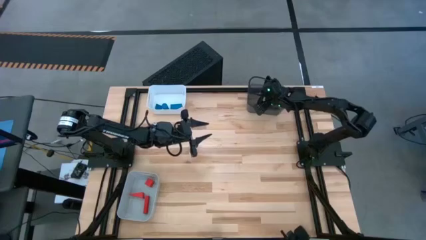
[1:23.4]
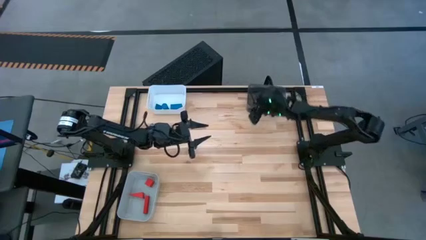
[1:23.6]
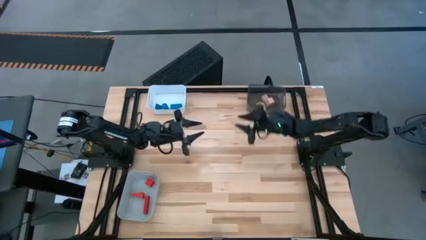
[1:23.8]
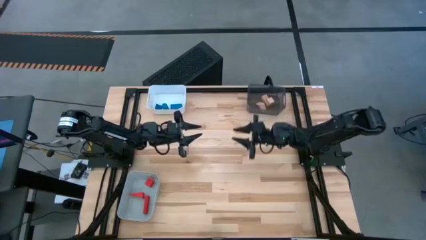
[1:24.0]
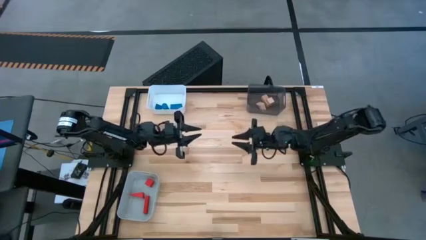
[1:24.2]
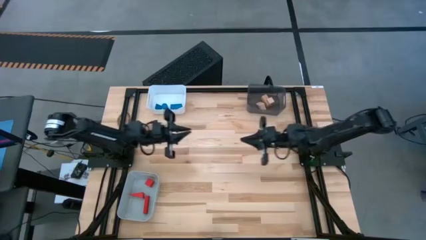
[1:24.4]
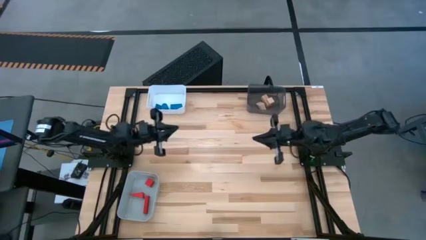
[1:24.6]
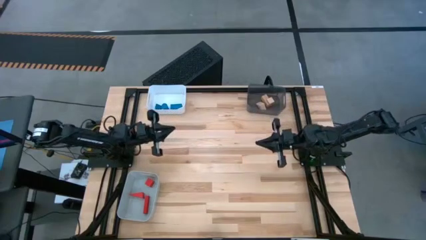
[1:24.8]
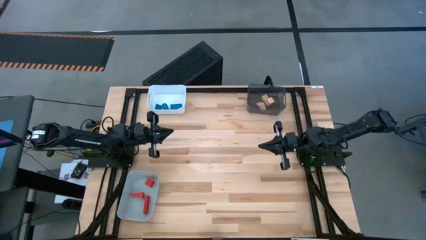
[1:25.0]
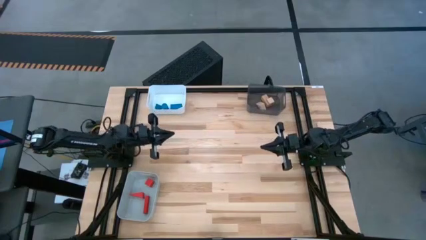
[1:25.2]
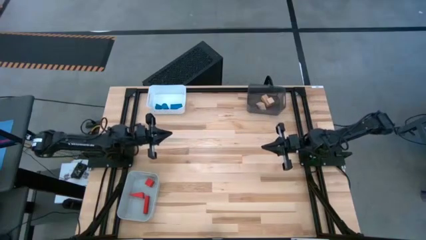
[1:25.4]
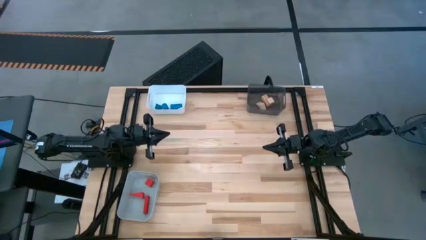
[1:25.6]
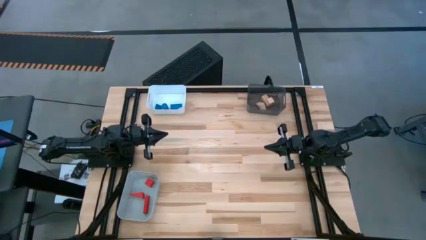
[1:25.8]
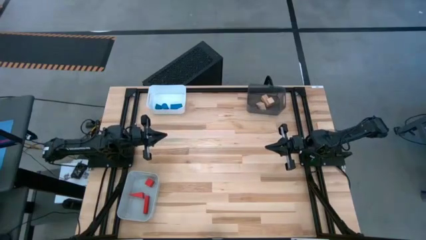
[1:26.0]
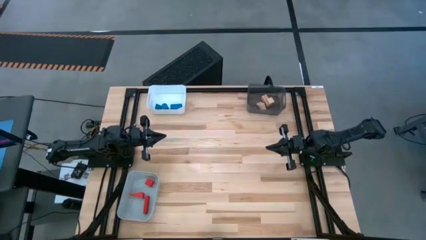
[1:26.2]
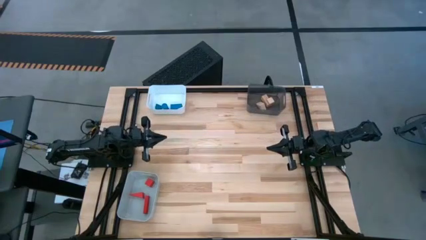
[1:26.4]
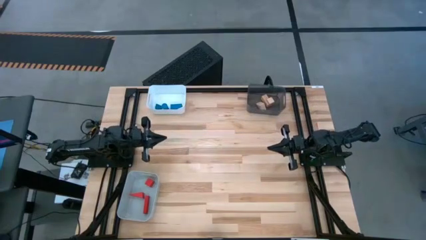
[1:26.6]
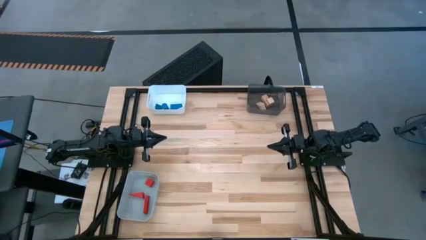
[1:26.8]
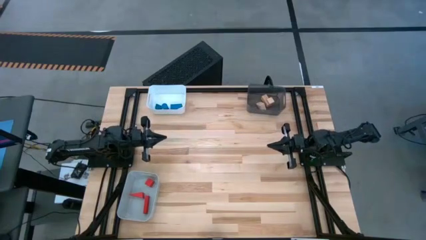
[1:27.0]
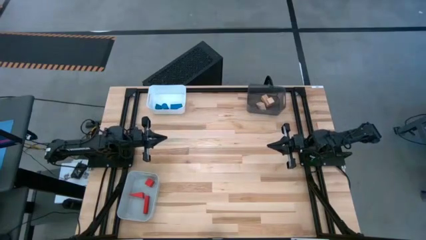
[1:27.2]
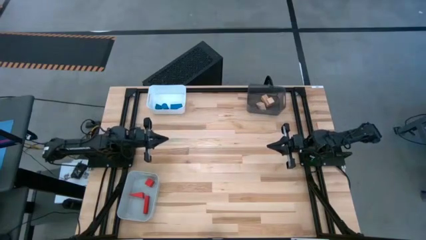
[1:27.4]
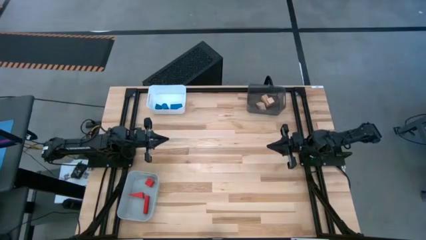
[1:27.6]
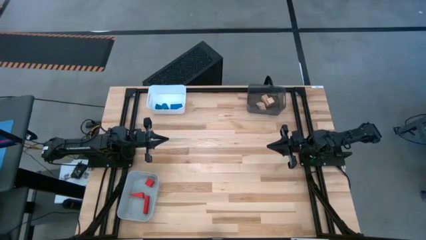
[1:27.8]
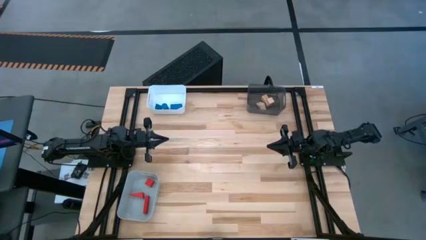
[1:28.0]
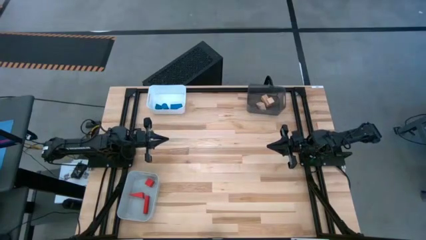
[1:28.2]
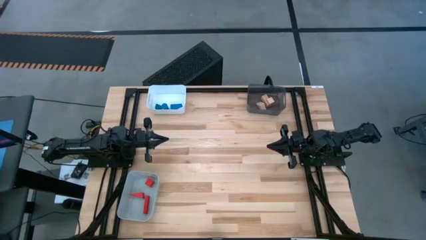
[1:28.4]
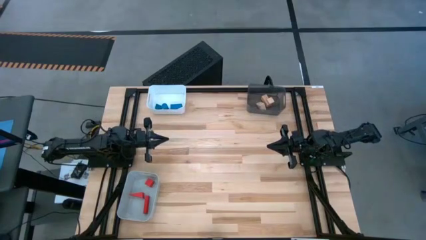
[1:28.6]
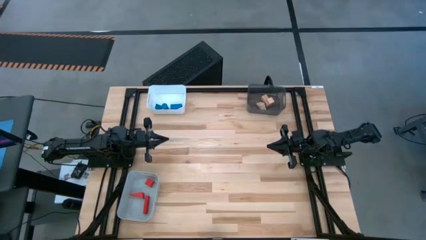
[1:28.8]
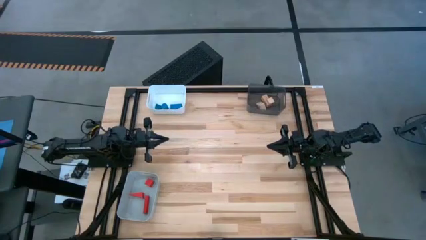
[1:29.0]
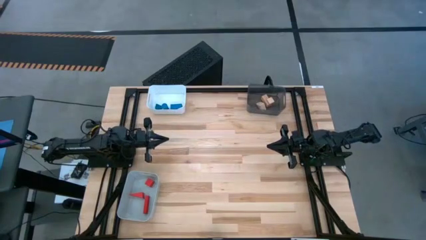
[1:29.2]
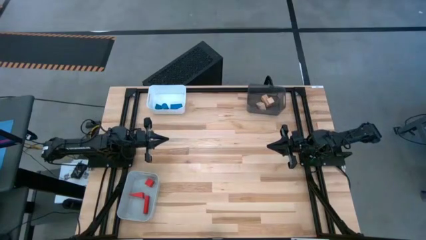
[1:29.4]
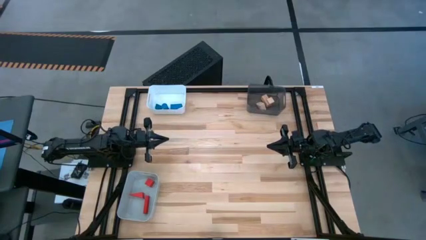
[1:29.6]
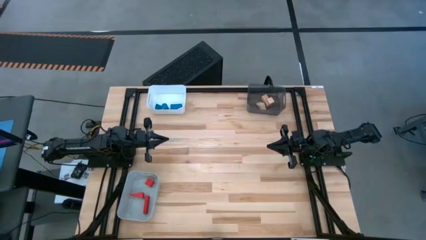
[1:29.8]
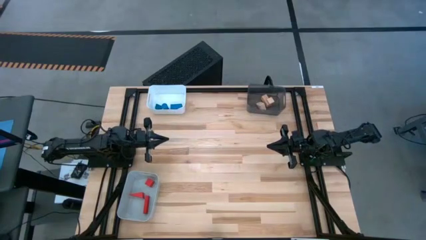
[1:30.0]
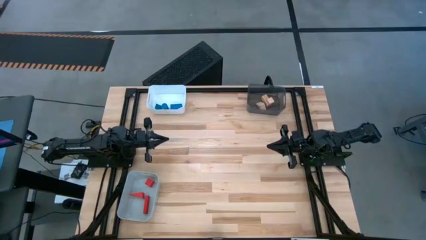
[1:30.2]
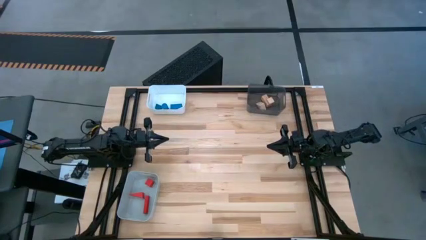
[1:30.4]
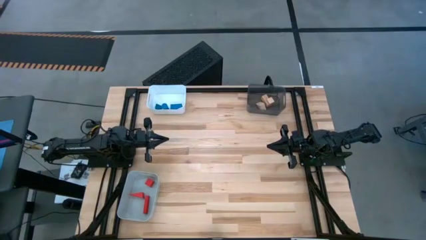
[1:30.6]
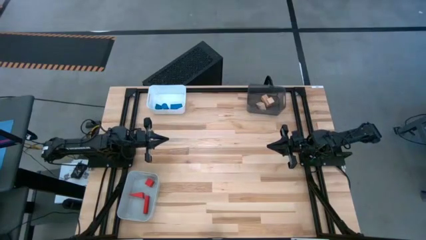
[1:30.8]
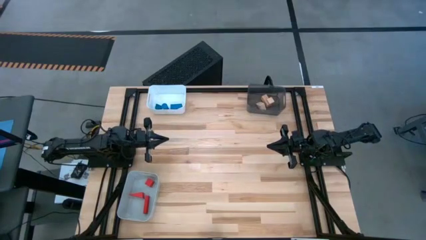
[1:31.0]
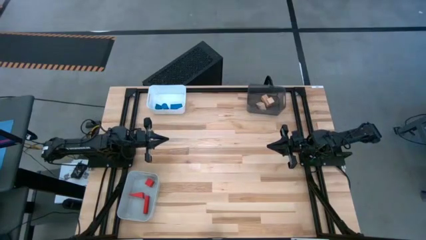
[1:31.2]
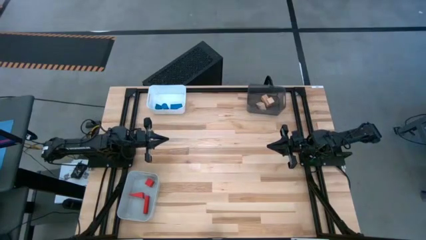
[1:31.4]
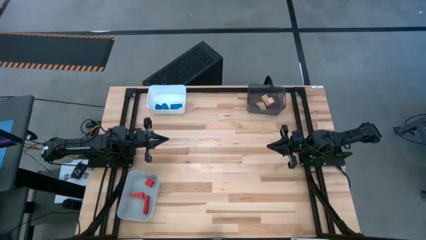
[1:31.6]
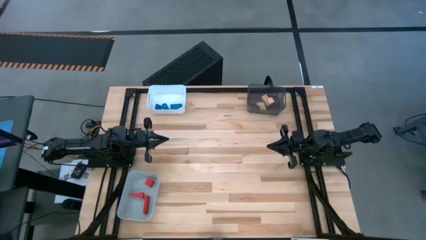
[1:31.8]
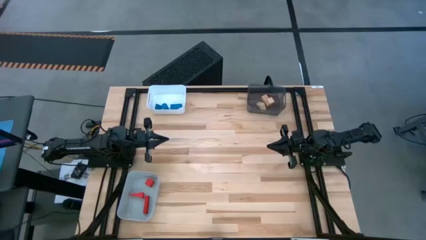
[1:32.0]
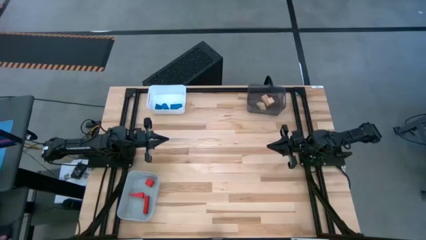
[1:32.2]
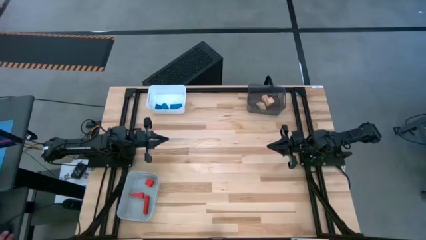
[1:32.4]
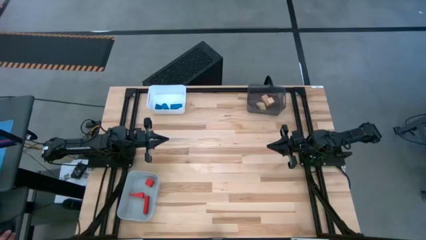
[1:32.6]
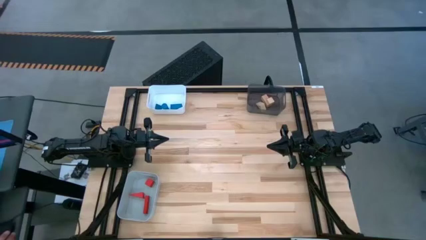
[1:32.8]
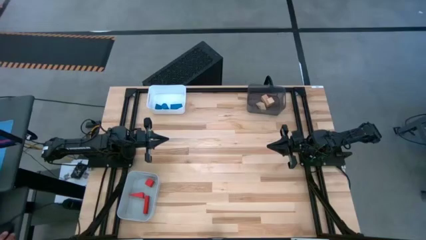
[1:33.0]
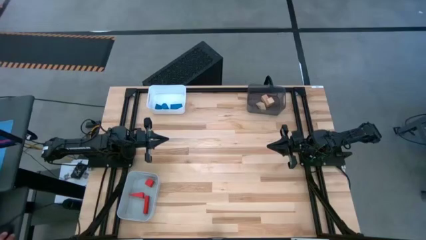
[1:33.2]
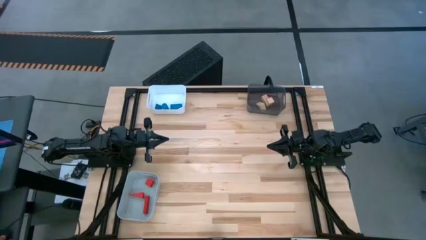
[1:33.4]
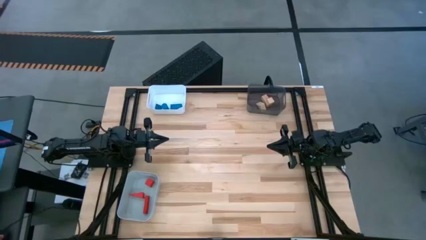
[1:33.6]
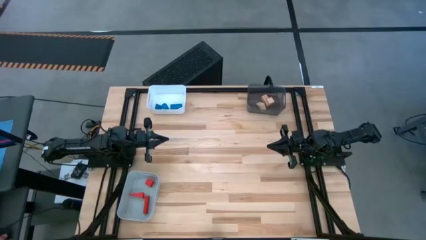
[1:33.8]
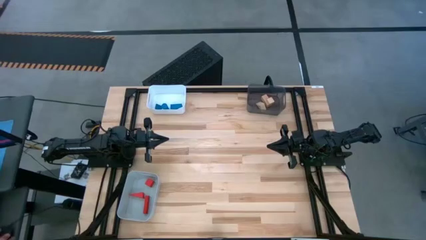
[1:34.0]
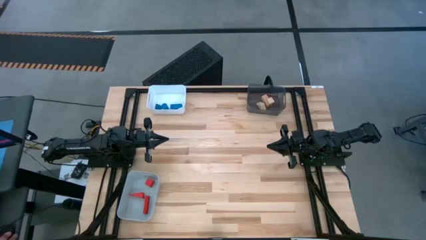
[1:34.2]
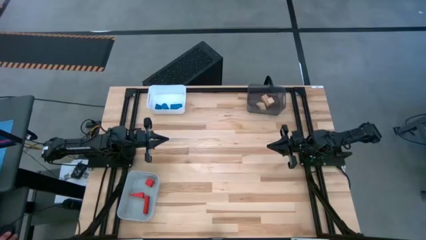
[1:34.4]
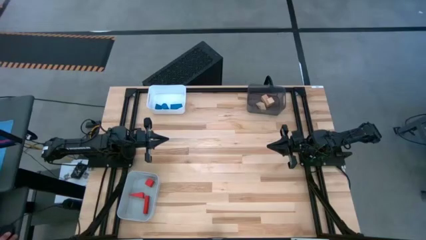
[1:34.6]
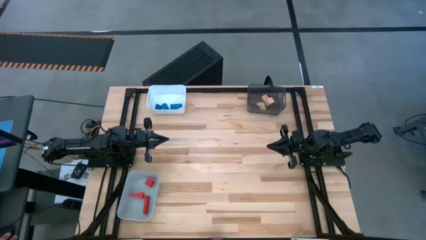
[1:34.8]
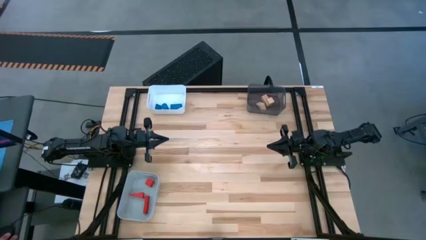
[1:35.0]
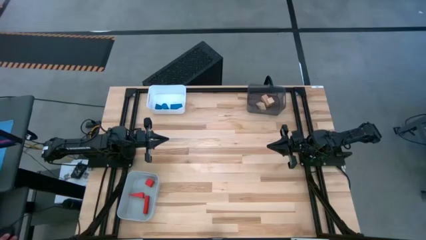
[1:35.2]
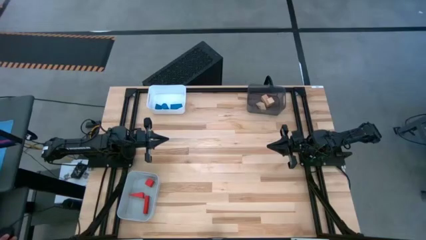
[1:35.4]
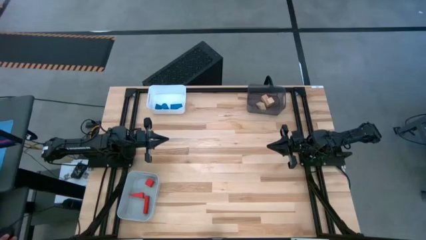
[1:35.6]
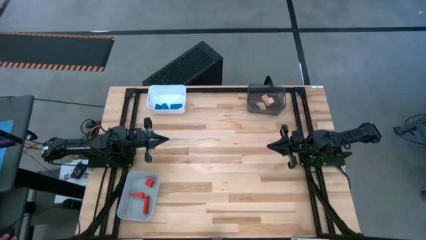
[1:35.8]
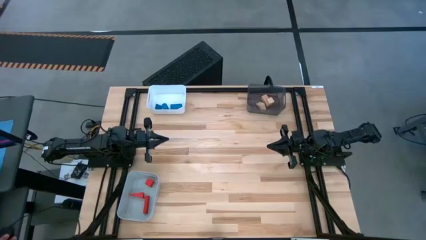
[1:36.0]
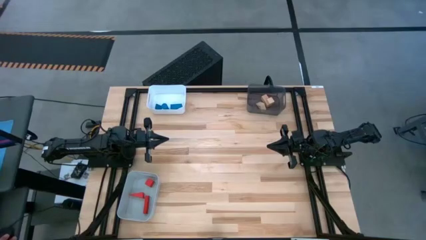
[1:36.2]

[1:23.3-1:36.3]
Task: Sort & place blocks by color
Return to Home Position

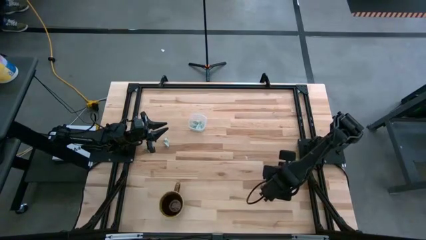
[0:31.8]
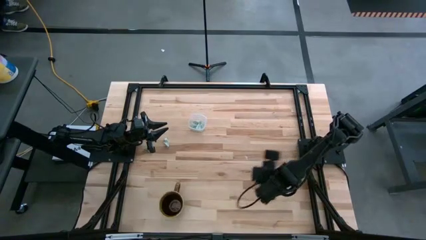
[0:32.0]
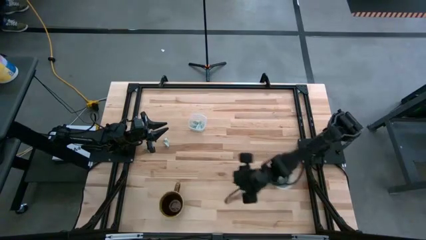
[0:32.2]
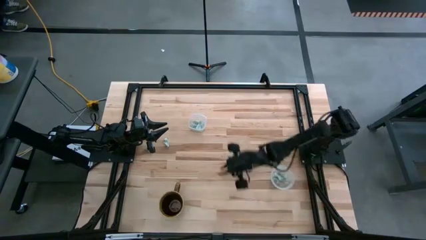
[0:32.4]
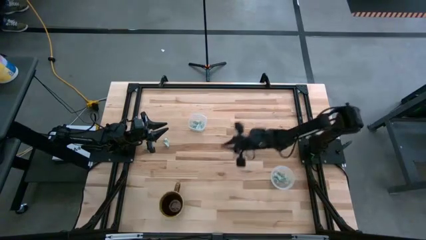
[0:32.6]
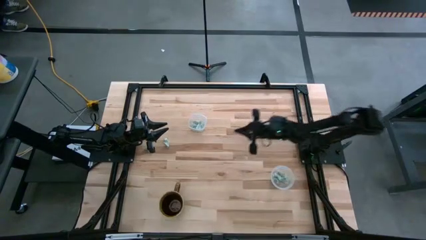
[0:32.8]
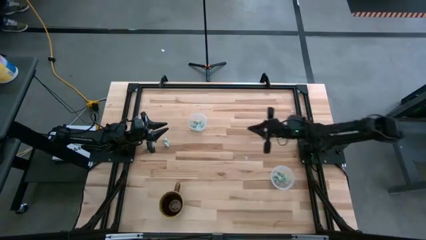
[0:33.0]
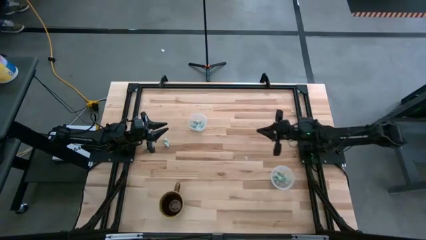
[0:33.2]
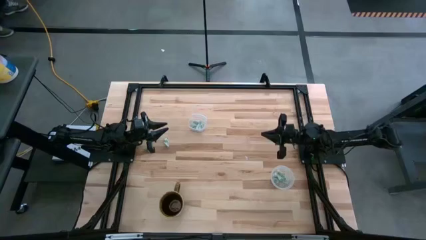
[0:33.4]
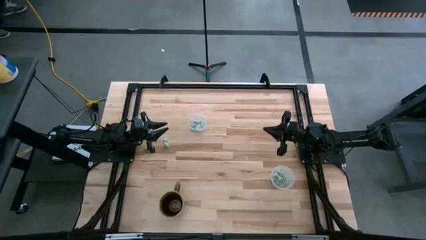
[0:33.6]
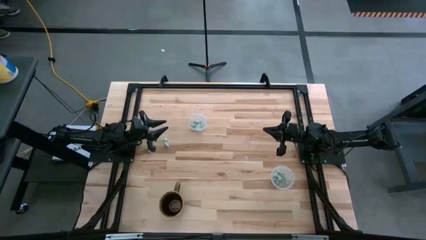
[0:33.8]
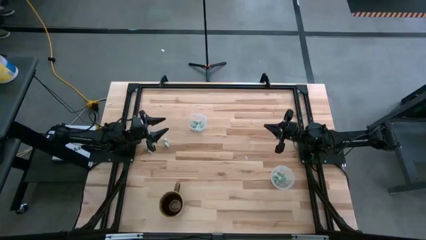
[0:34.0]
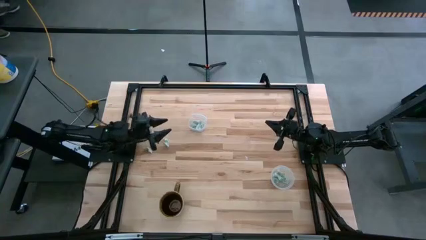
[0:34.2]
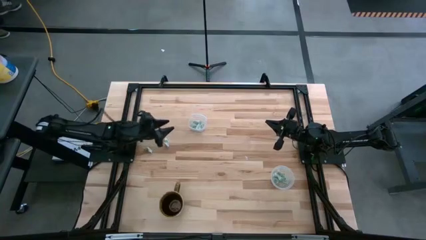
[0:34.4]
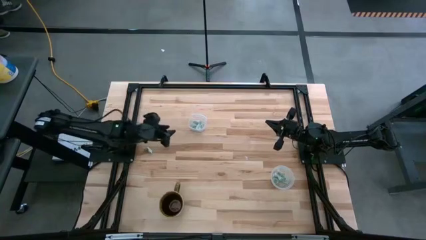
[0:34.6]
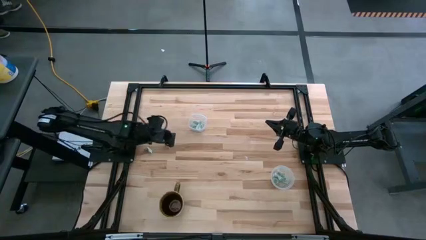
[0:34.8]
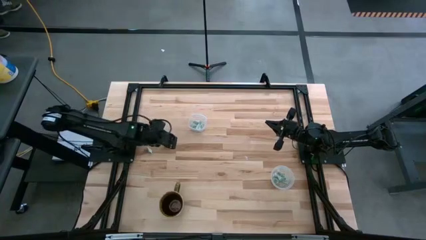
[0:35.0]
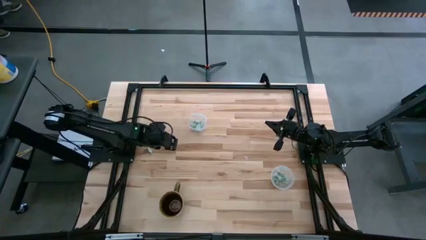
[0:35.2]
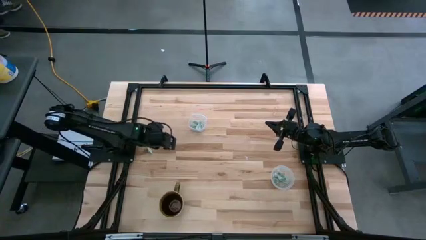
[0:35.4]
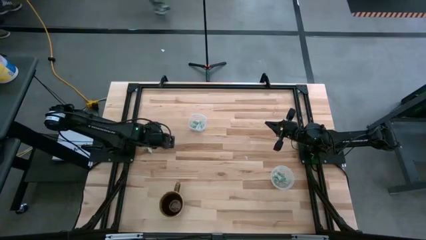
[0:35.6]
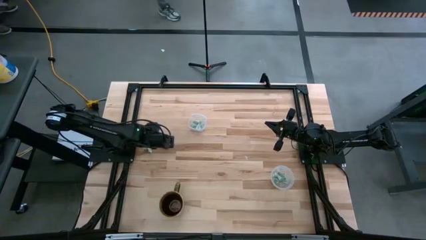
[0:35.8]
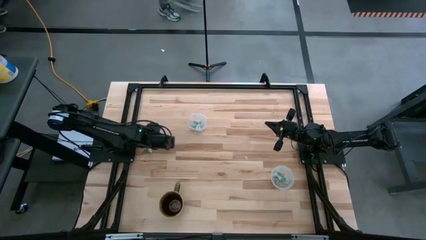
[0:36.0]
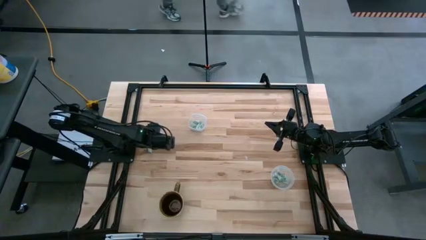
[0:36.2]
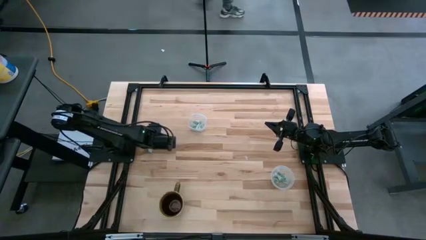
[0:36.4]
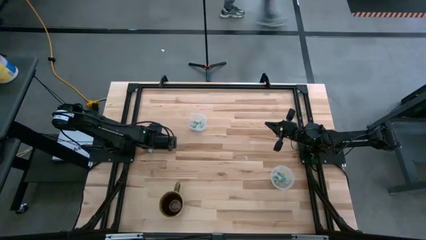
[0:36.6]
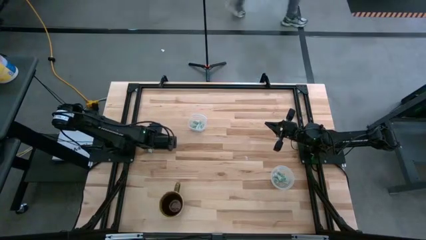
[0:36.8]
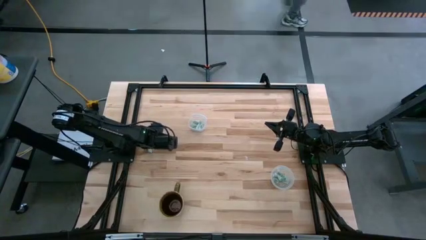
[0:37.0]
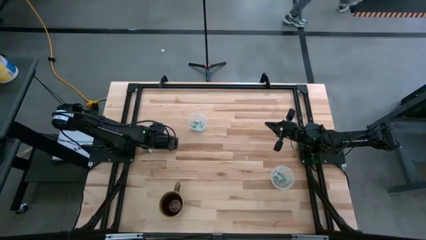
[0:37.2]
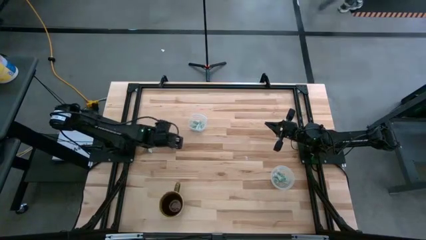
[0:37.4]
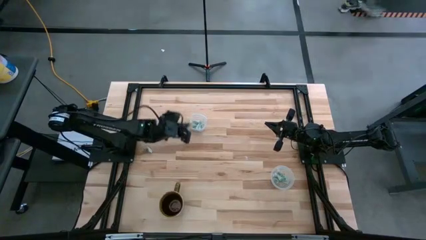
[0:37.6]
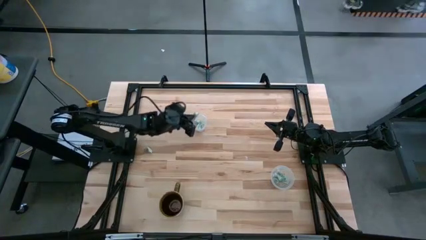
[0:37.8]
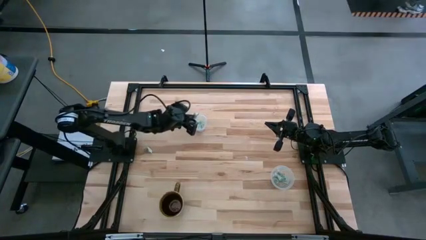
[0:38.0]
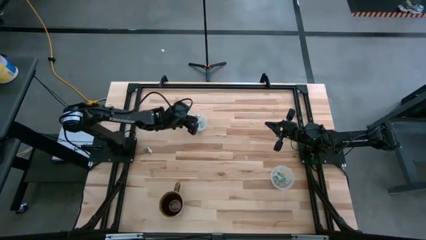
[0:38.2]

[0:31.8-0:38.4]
Task: Pick and place items into bin
Put the white stevia packet into the top transparent bin
